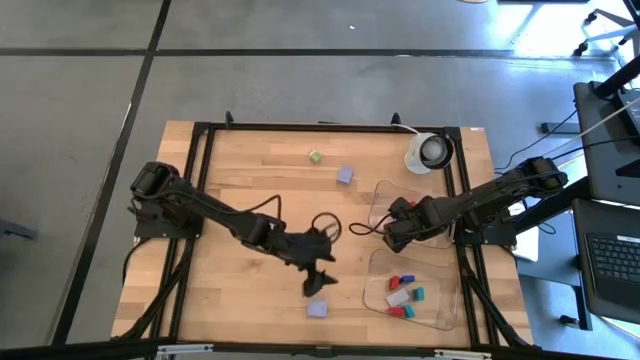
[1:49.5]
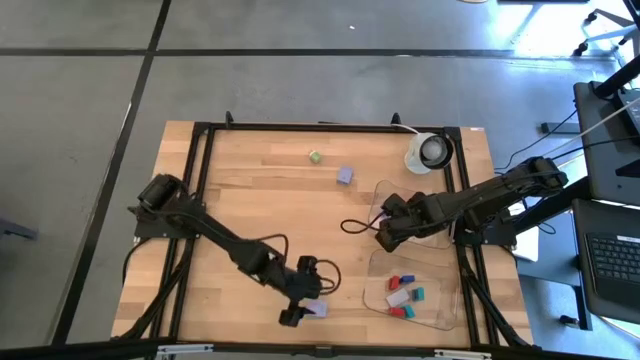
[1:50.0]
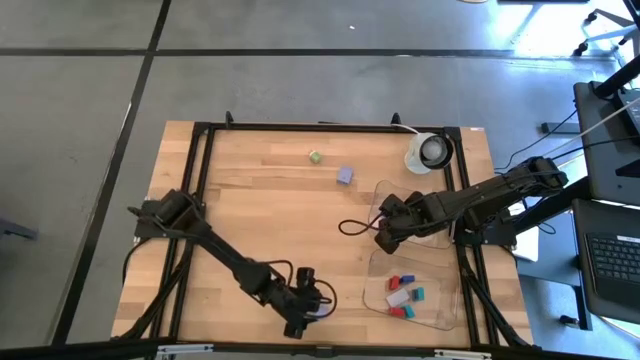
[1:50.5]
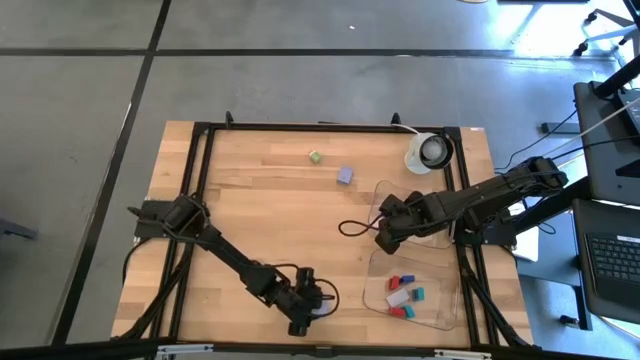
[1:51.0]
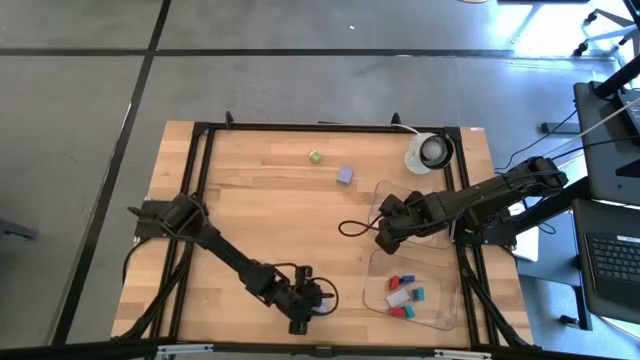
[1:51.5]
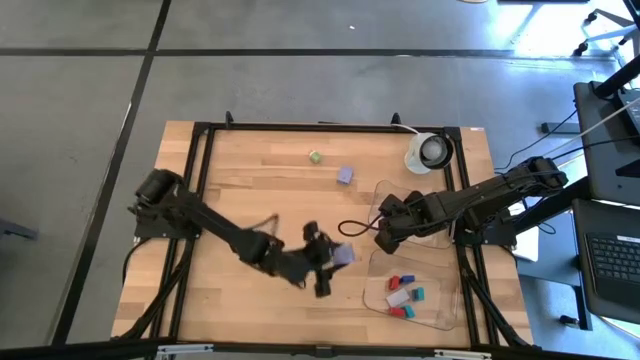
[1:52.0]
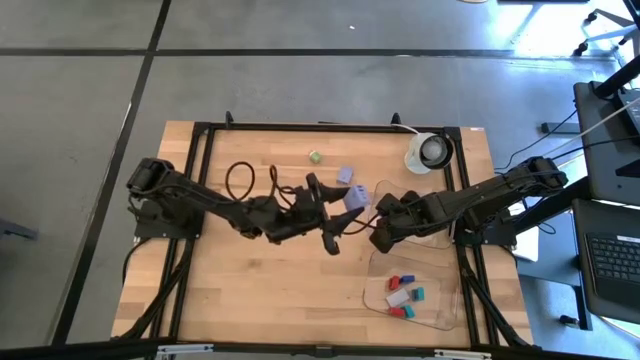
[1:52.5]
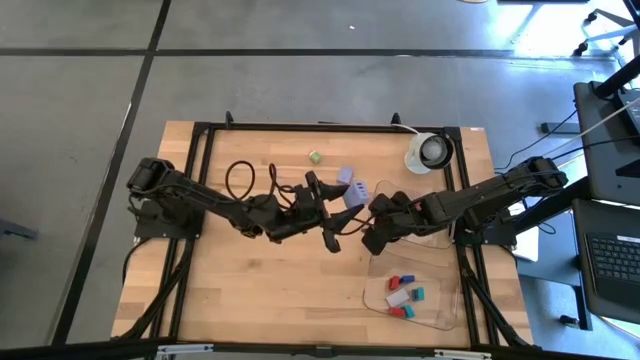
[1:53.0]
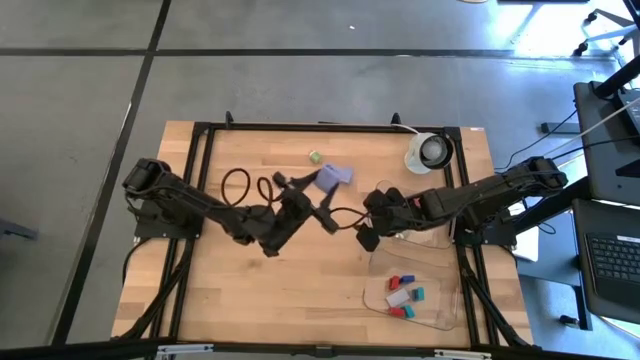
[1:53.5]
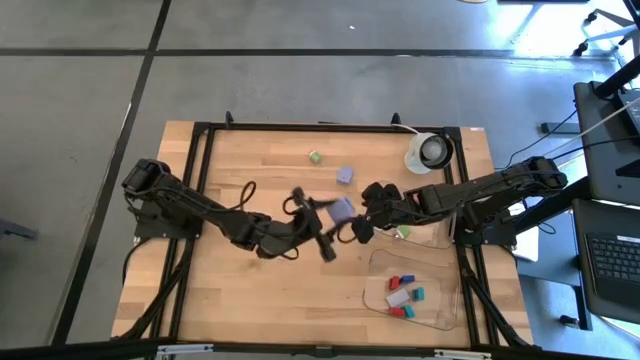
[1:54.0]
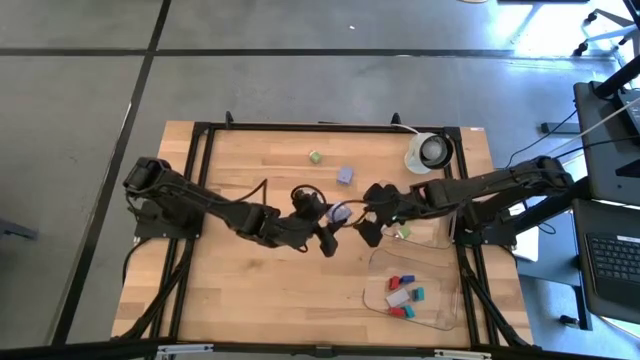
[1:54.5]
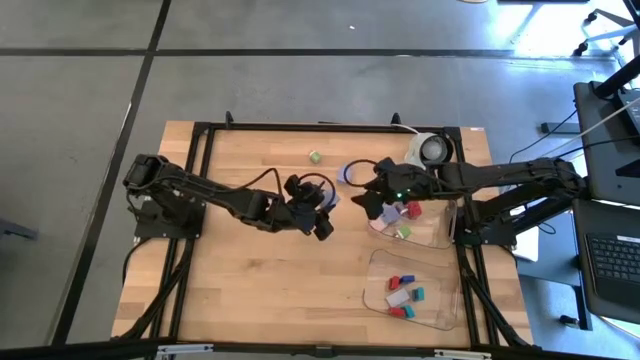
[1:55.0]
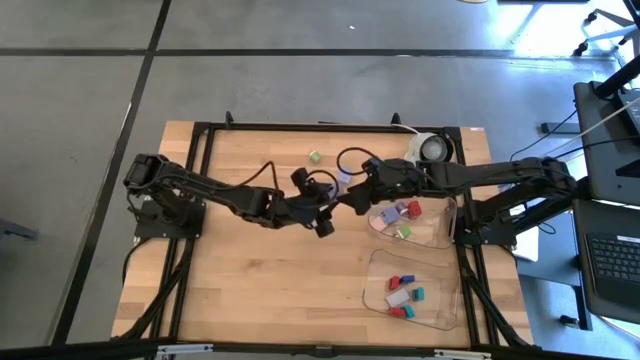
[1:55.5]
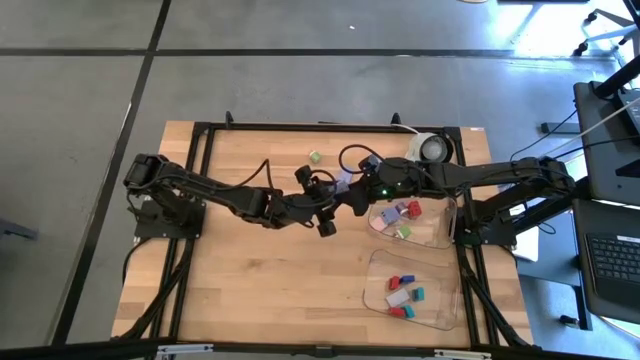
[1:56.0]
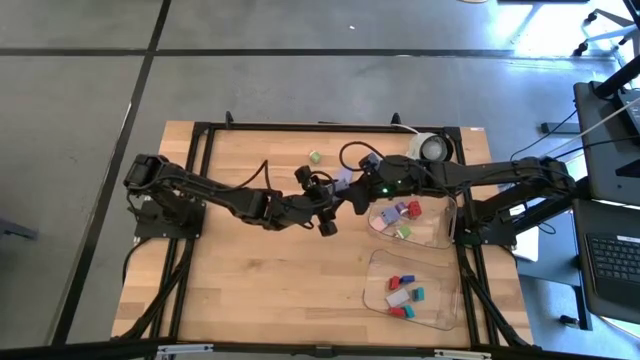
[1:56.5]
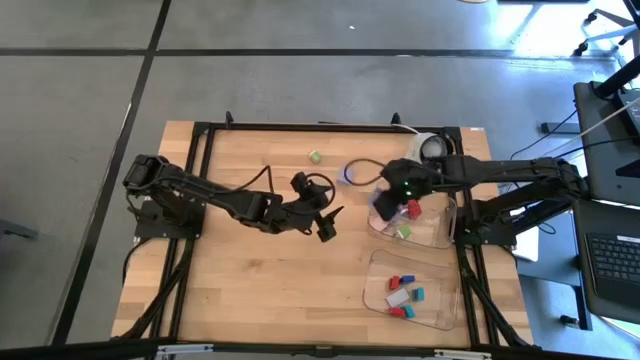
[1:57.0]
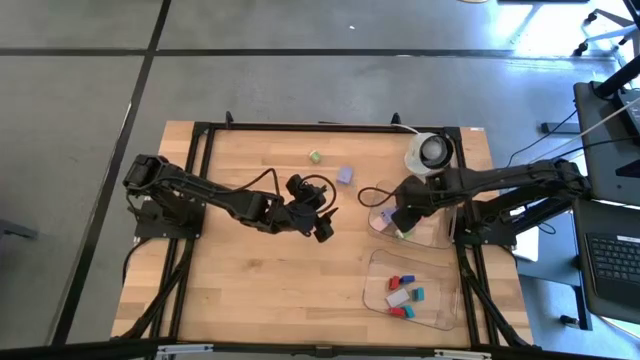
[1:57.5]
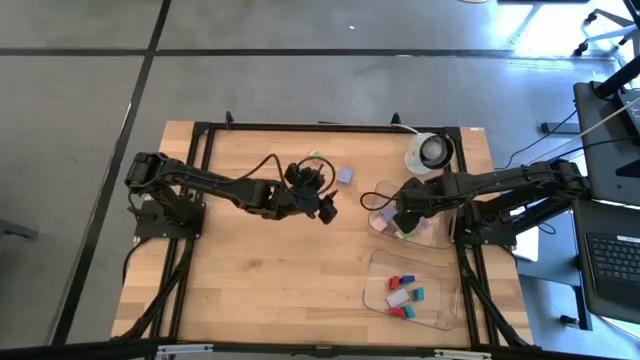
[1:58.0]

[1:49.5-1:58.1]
Task: Pick & Place Office items
Put the bottom blue charger adapter into the top transparent bin

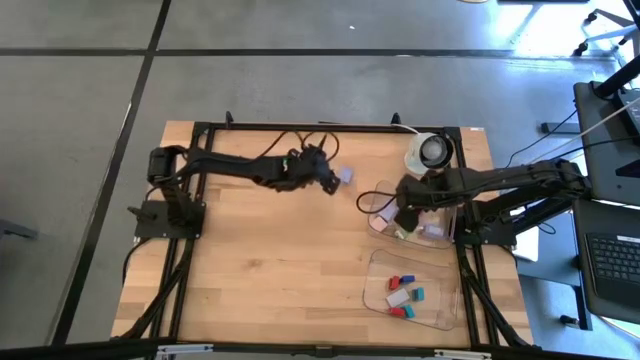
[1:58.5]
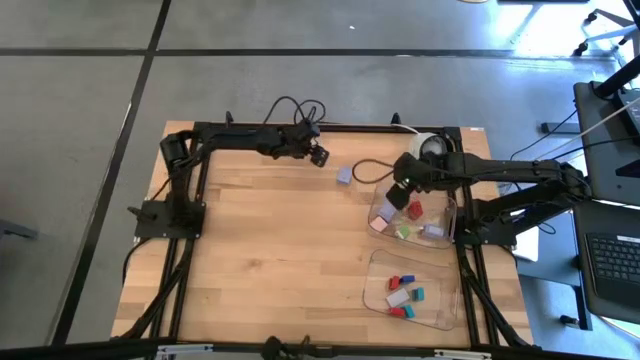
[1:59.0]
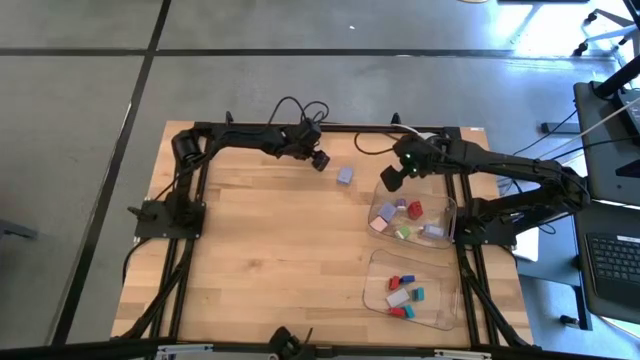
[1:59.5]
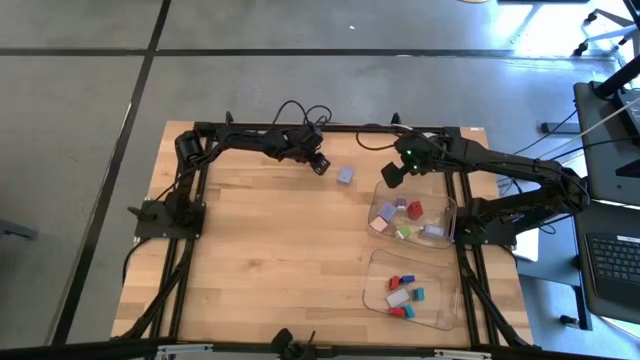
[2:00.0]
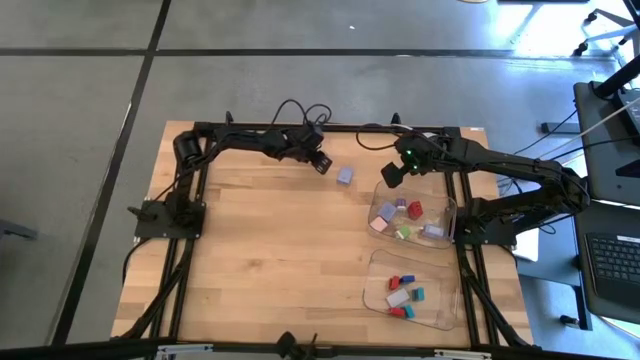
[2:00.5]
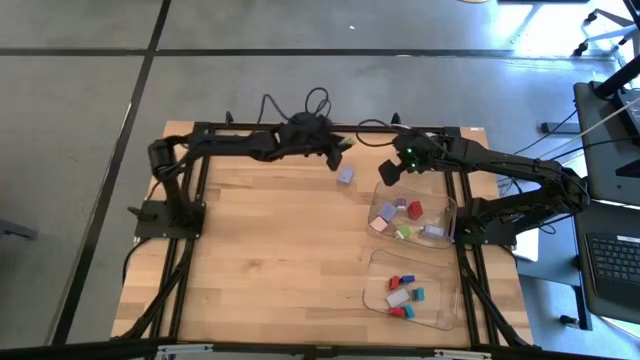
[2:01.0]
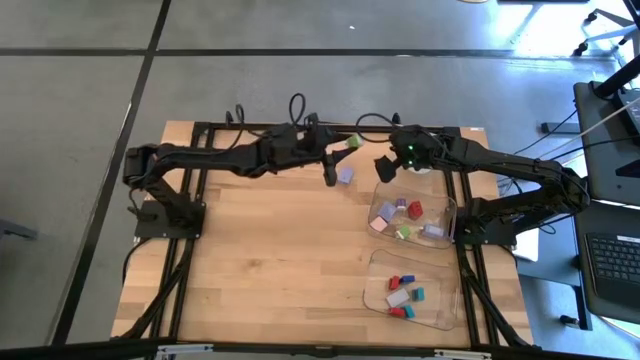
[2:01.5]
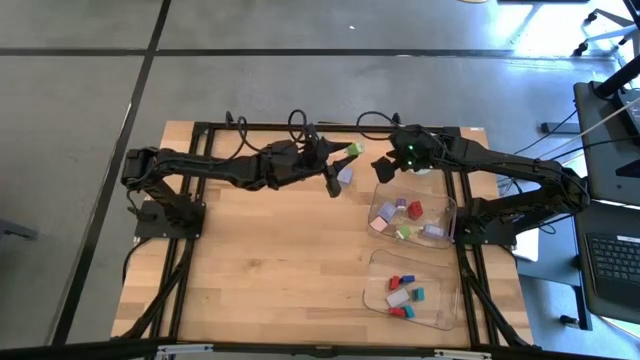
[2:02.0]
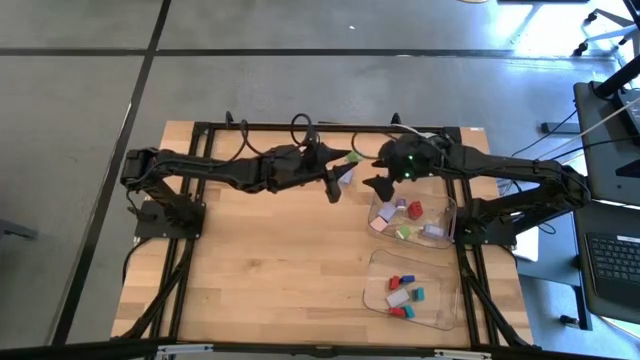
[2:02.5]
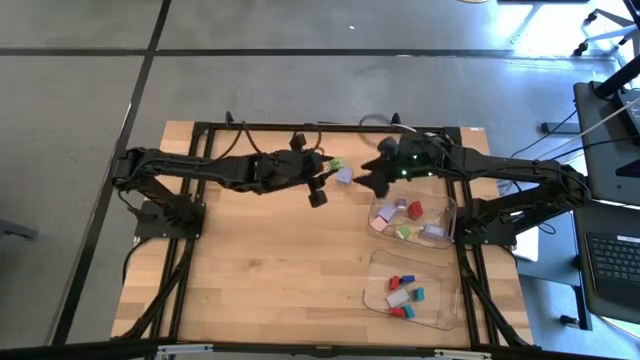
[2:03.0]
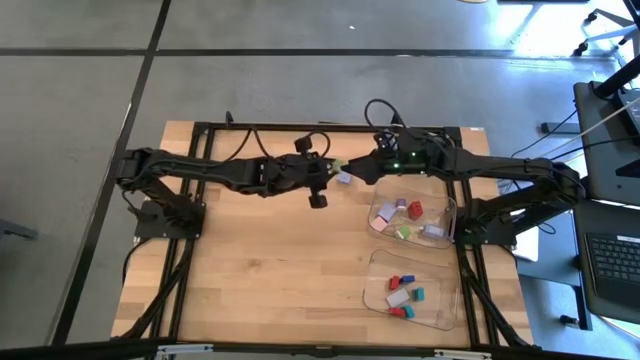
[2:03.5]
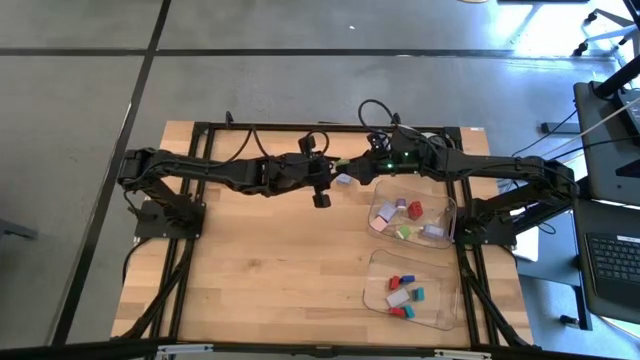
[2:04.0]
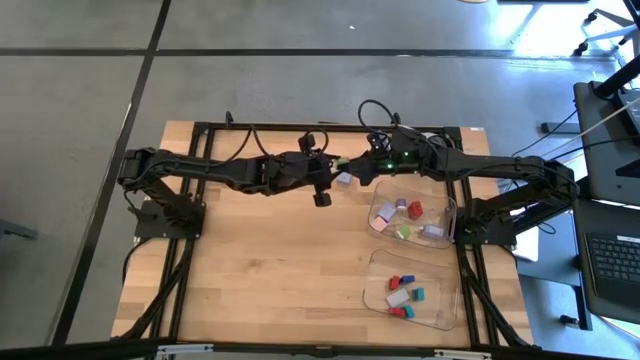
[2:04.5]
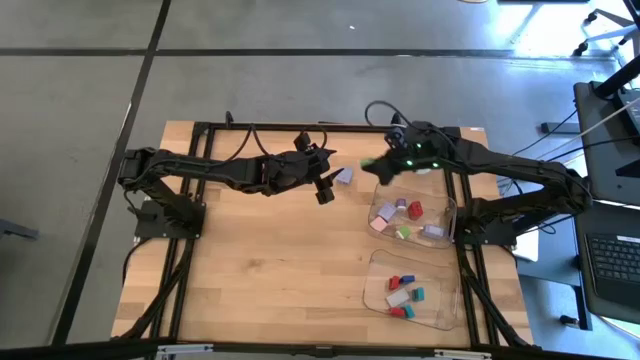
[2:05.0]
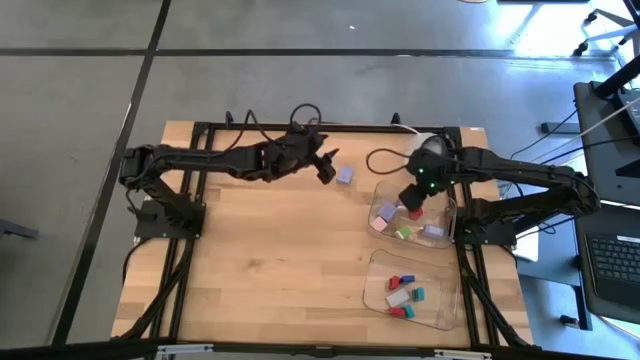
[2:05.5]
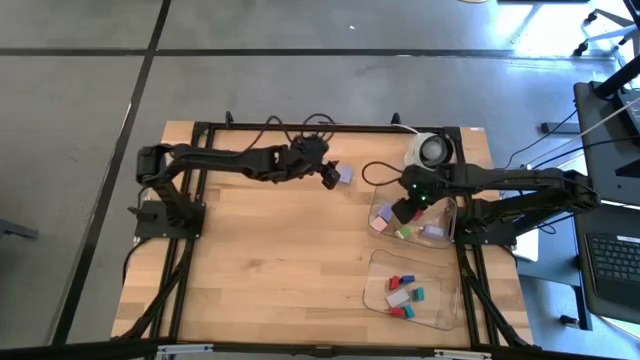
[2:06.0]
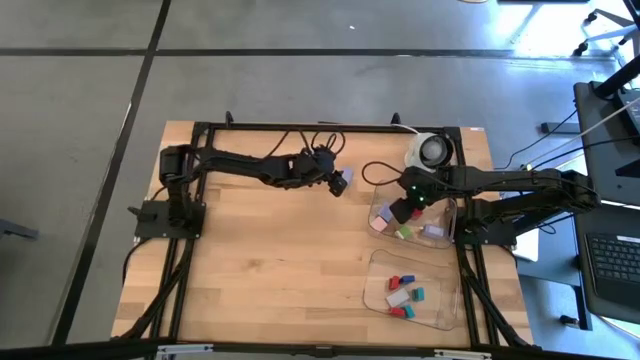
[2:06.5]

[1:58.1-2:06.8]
Put the green charger adapter into the top transparent bin

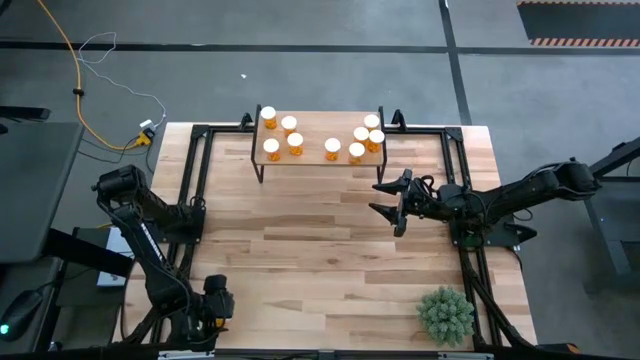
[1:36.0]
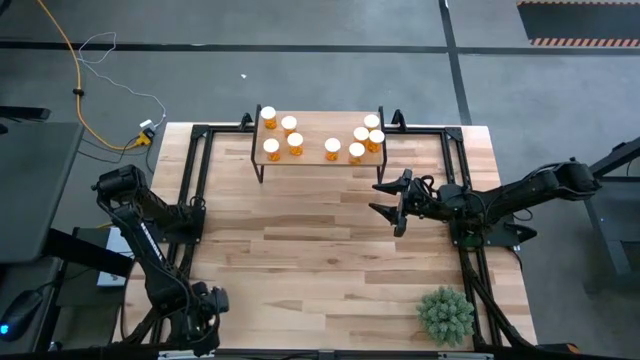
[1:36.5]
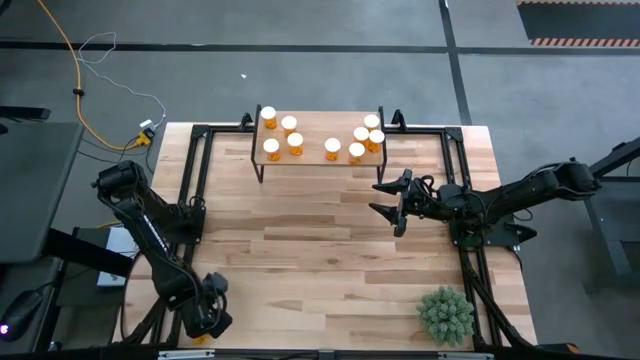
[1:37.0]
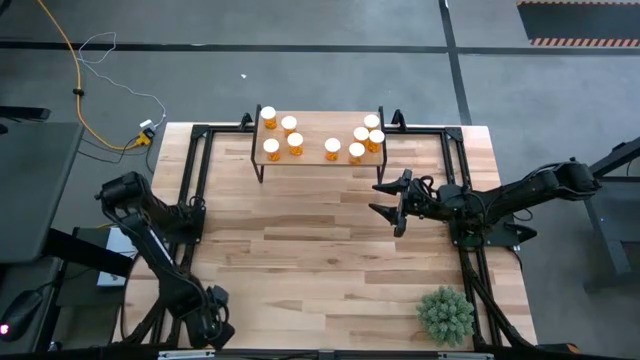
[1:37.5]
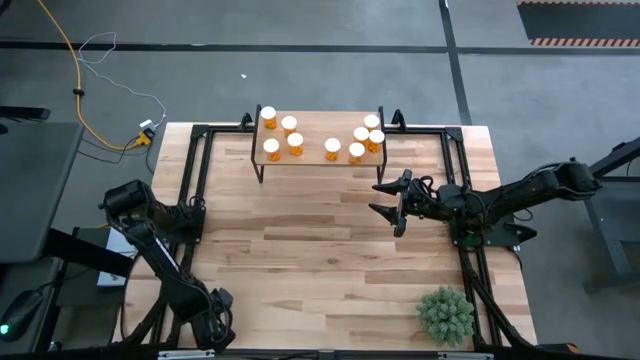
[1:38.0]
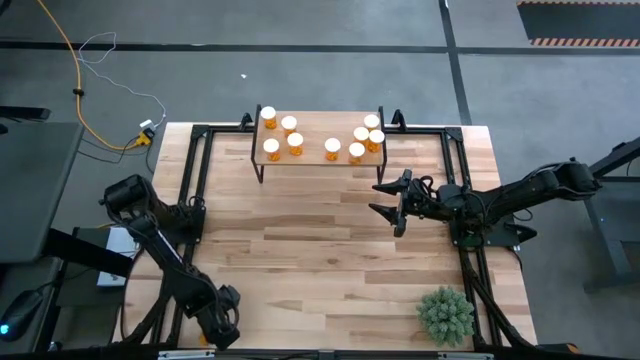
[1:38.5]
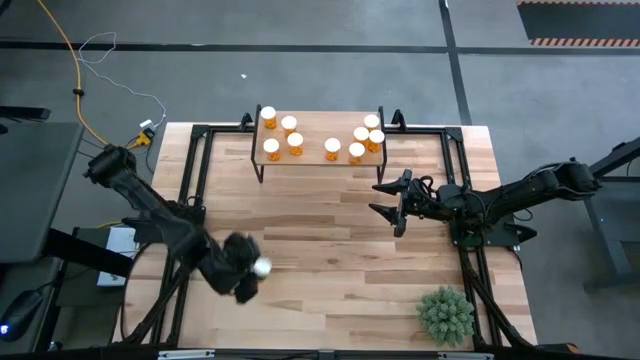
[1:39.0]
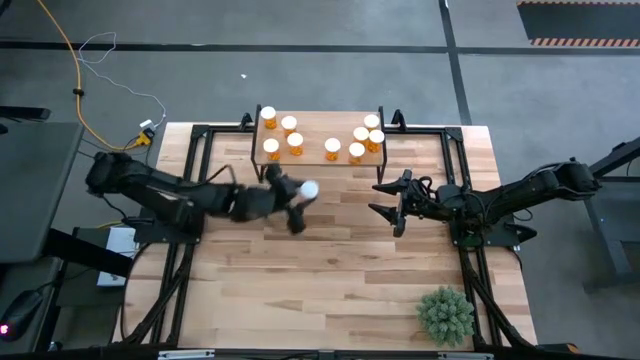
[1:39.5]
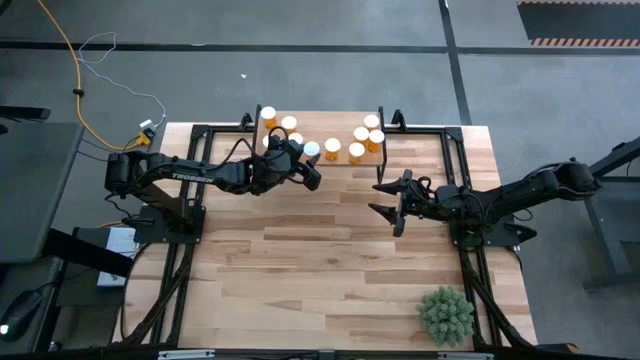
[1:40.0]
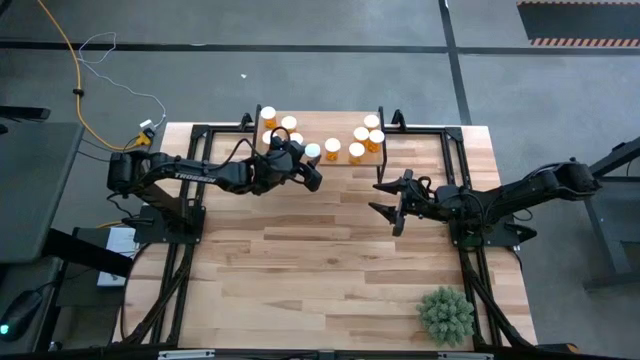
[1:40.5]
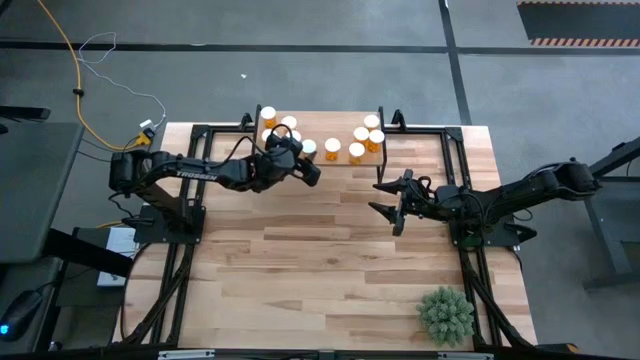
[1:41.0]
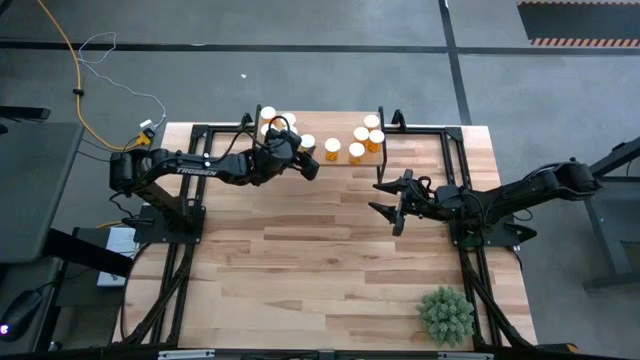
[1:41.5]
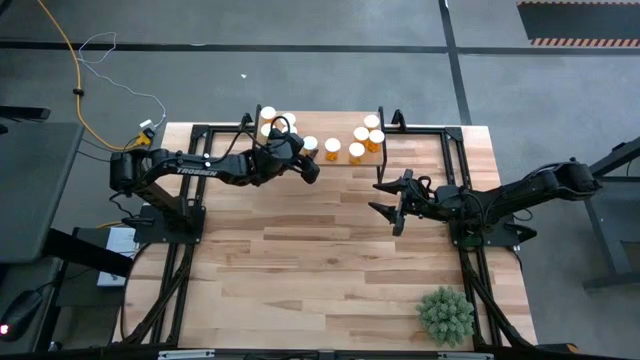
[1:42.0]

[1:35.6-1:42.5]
Task: Pick and place medicine bottles onto shelf by color
Put the orange pill bottle on the shelf
